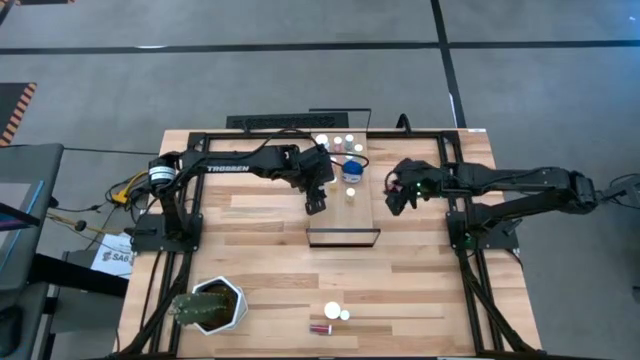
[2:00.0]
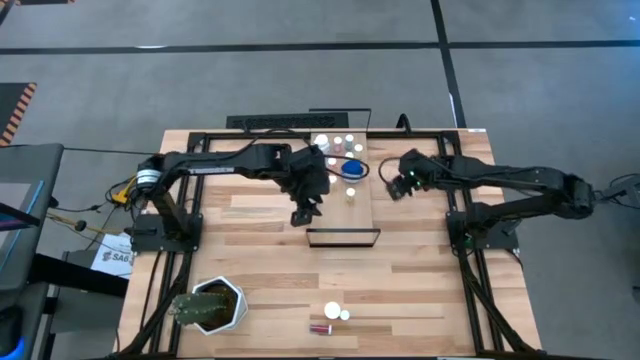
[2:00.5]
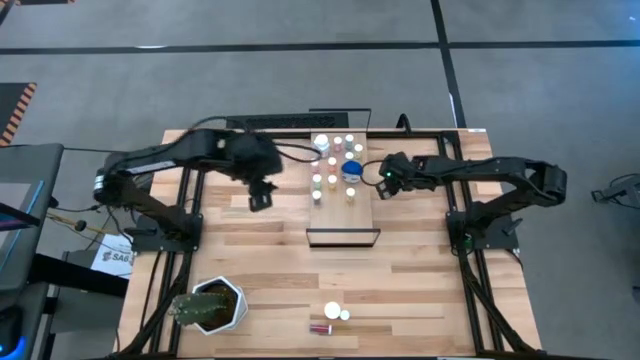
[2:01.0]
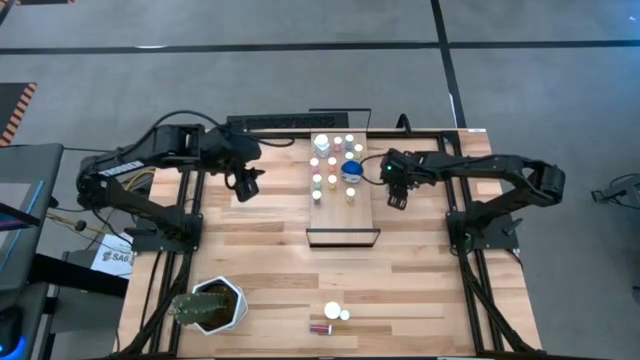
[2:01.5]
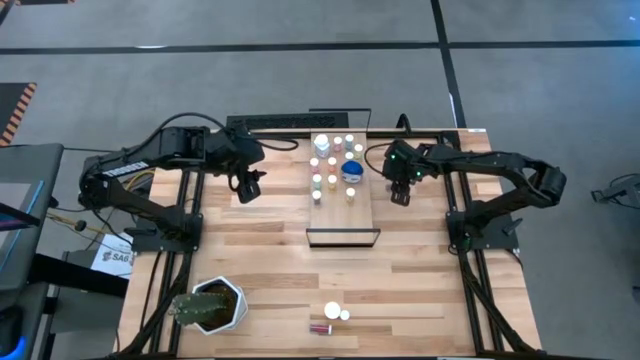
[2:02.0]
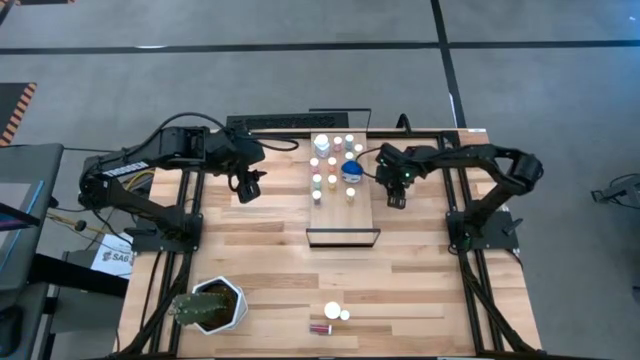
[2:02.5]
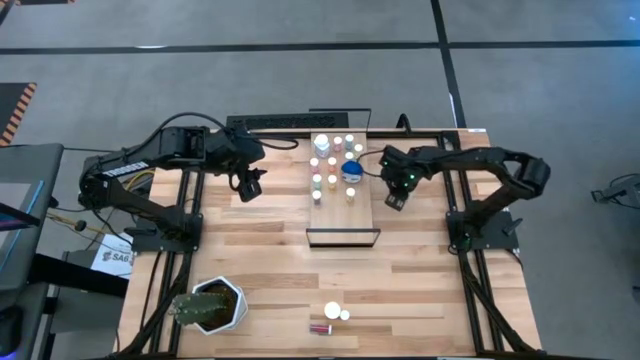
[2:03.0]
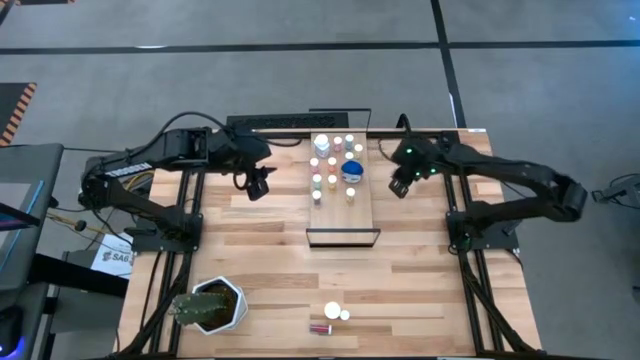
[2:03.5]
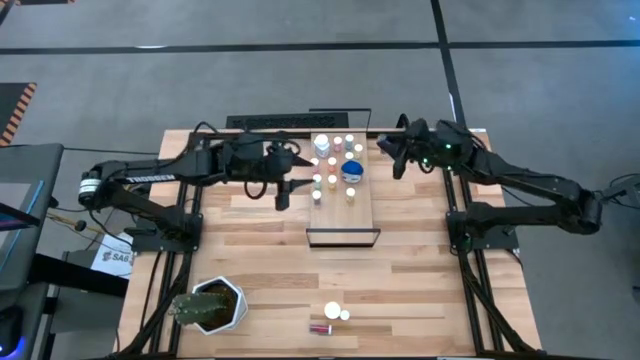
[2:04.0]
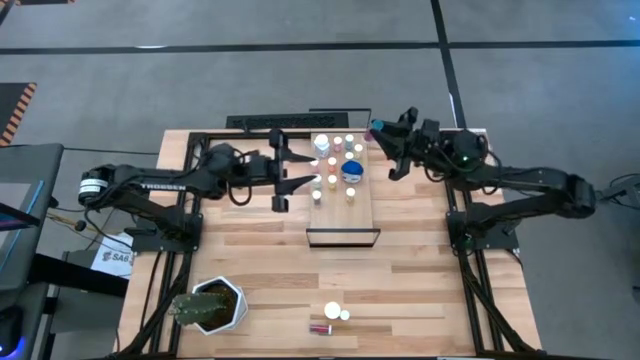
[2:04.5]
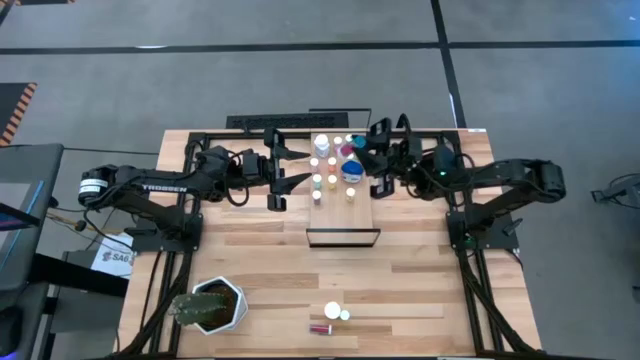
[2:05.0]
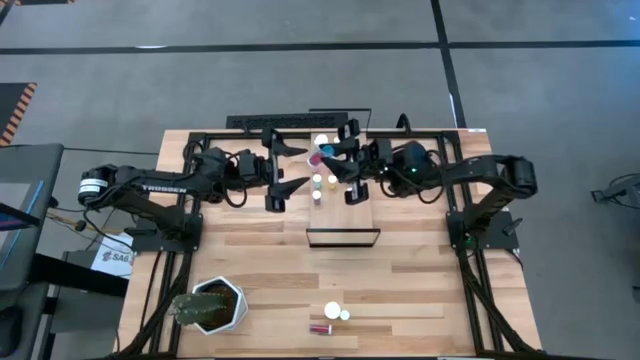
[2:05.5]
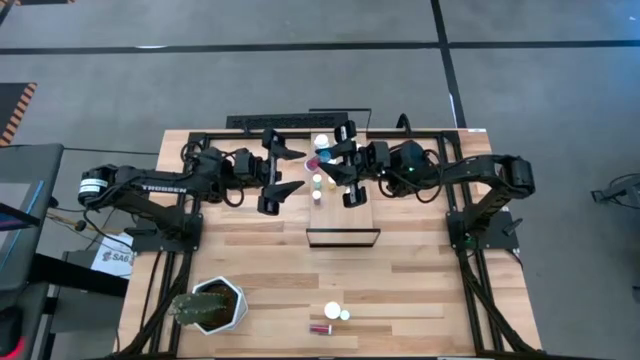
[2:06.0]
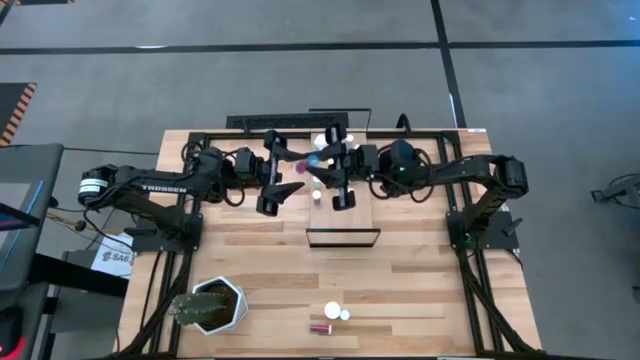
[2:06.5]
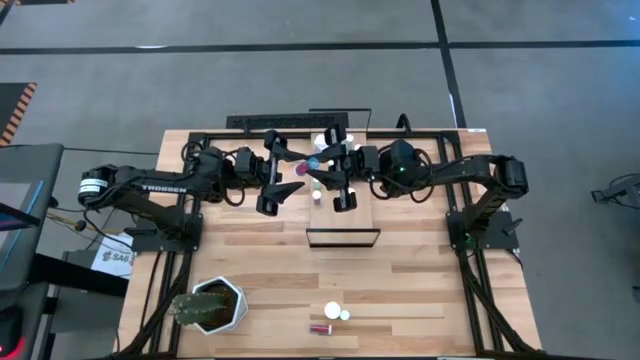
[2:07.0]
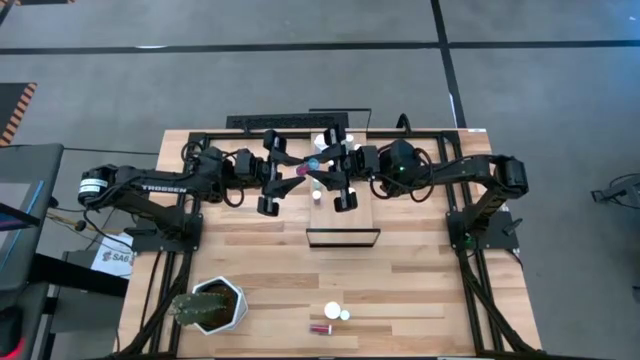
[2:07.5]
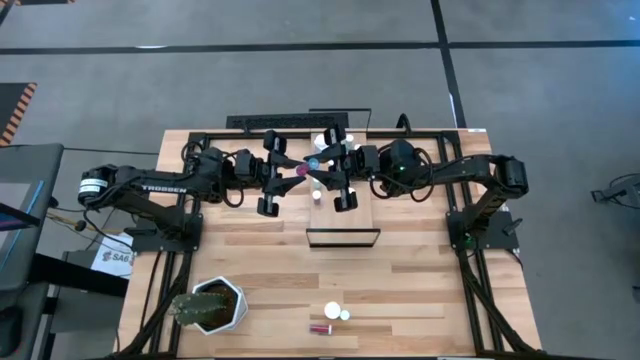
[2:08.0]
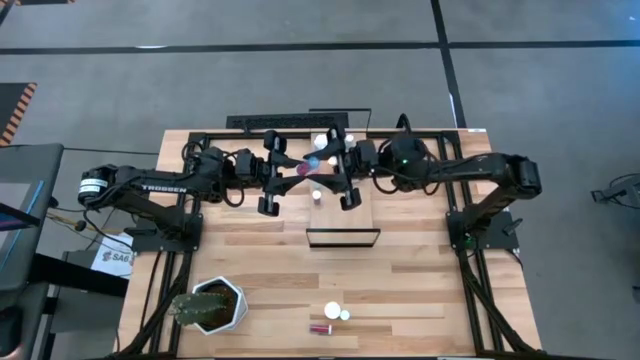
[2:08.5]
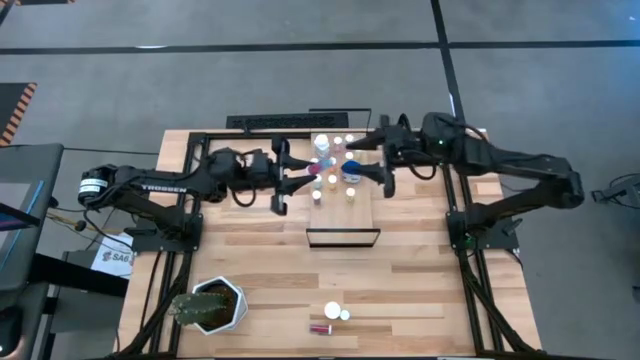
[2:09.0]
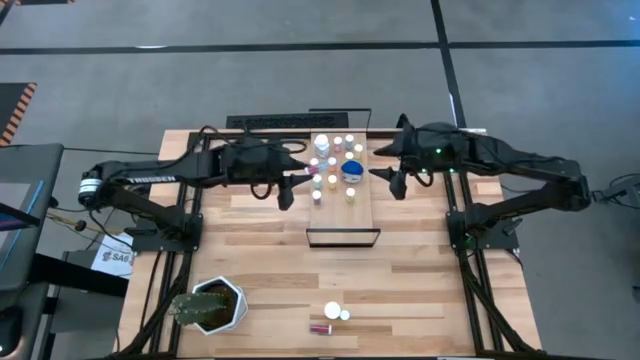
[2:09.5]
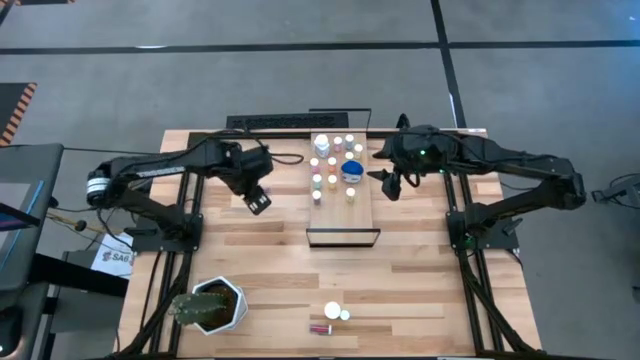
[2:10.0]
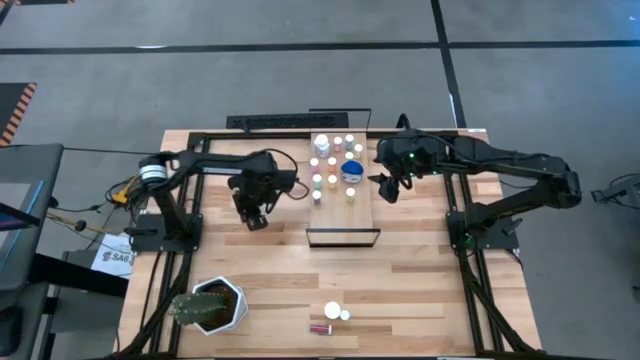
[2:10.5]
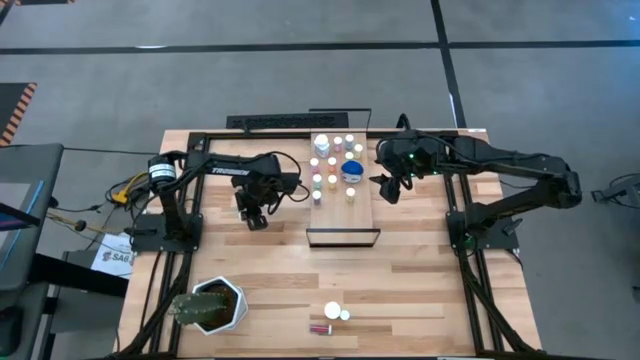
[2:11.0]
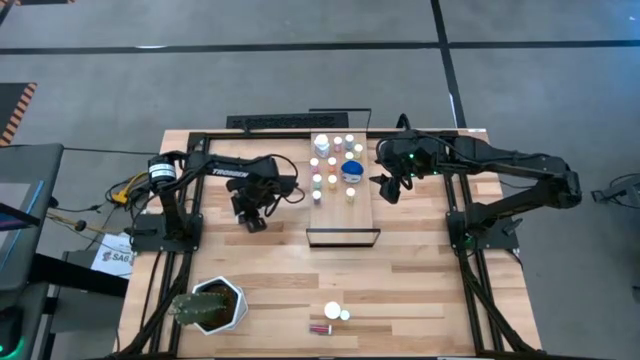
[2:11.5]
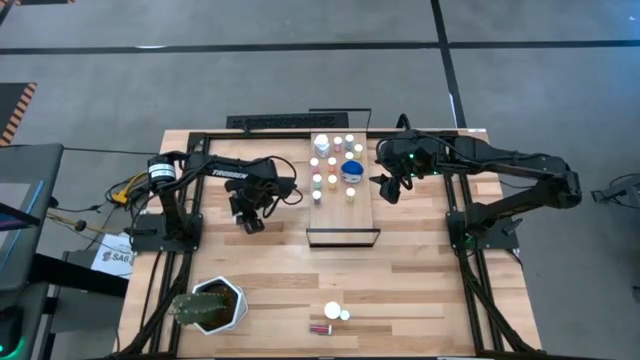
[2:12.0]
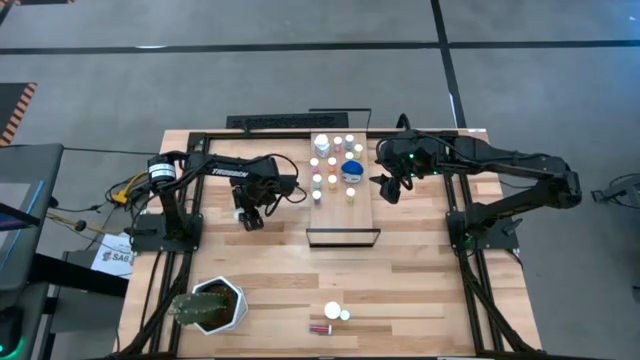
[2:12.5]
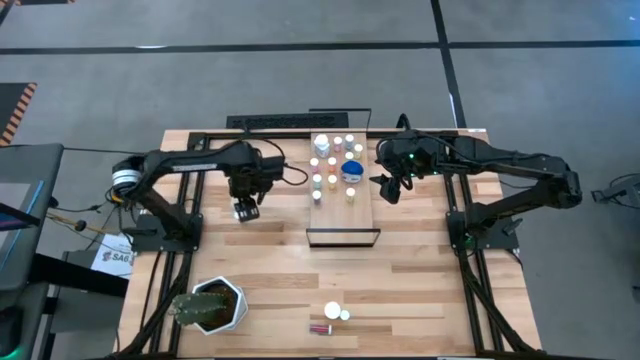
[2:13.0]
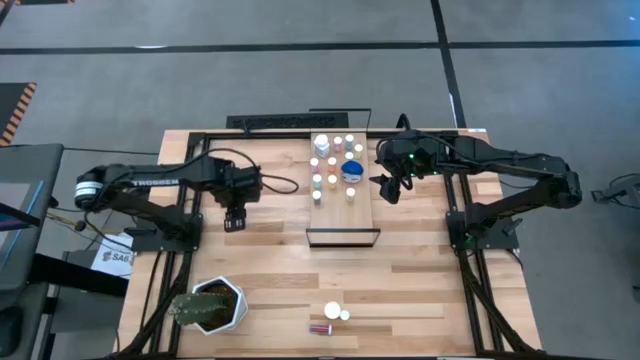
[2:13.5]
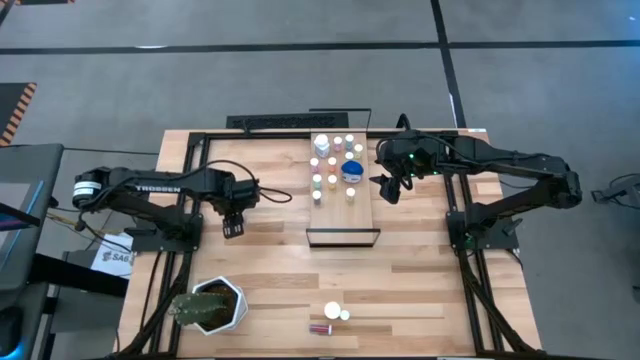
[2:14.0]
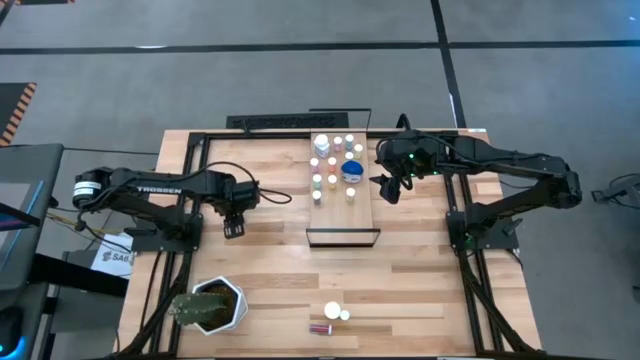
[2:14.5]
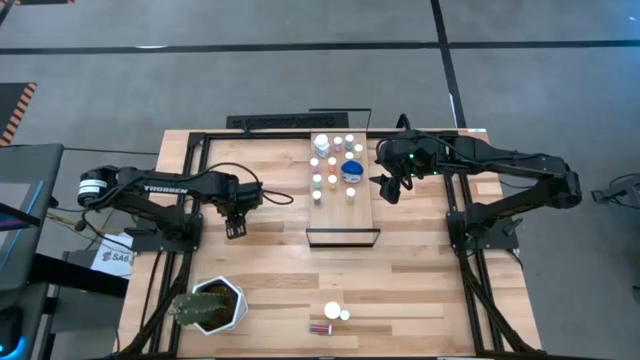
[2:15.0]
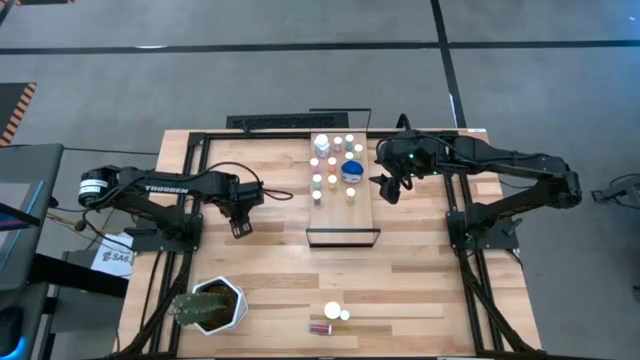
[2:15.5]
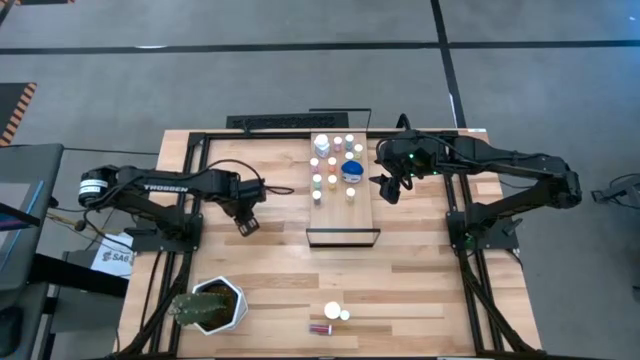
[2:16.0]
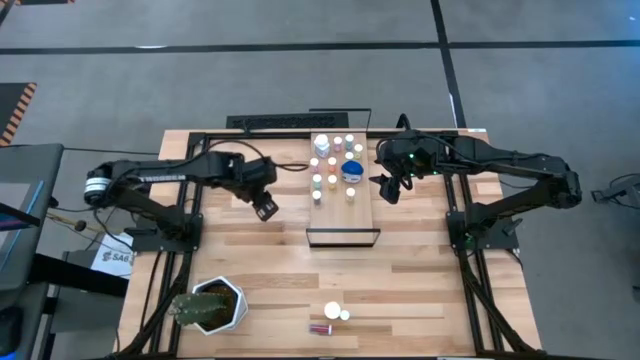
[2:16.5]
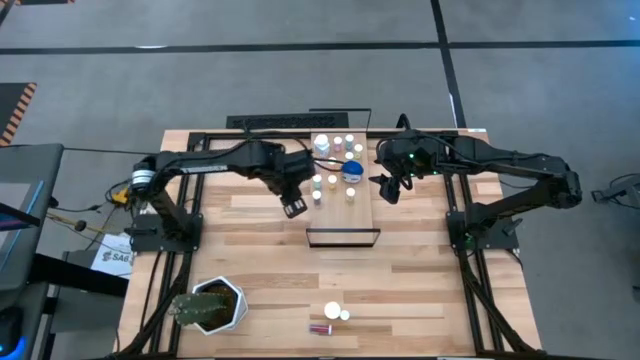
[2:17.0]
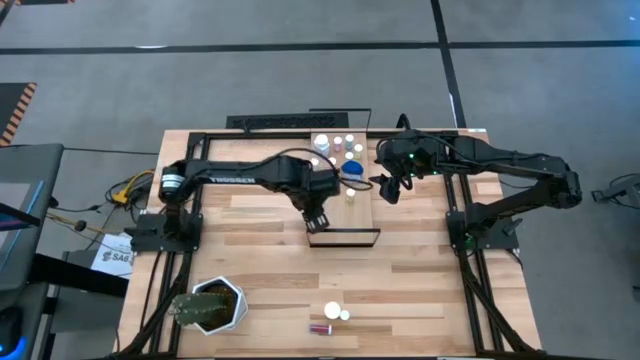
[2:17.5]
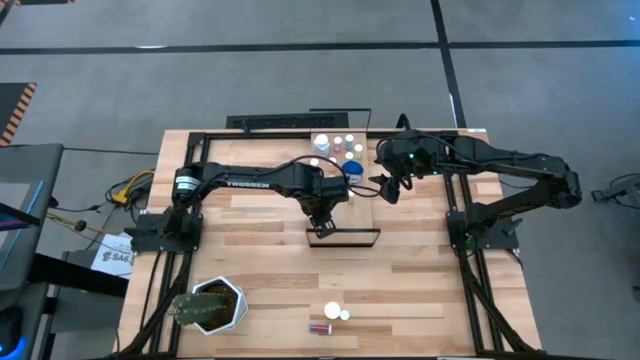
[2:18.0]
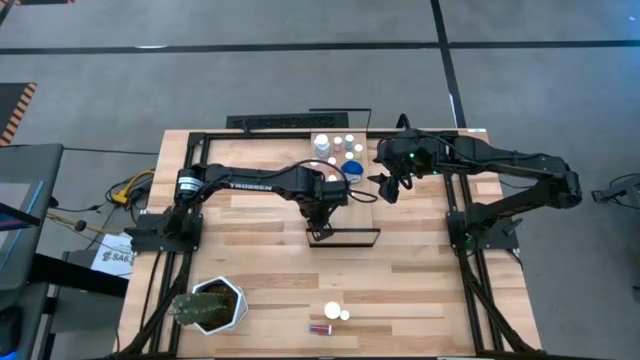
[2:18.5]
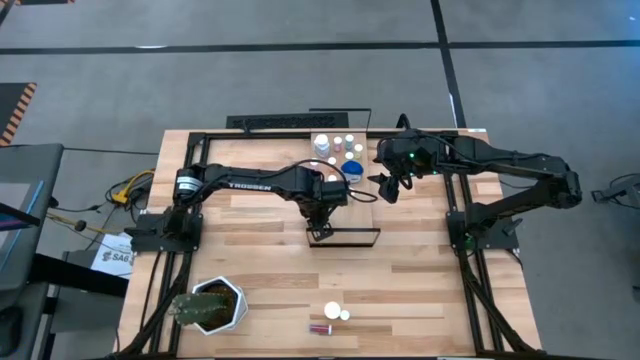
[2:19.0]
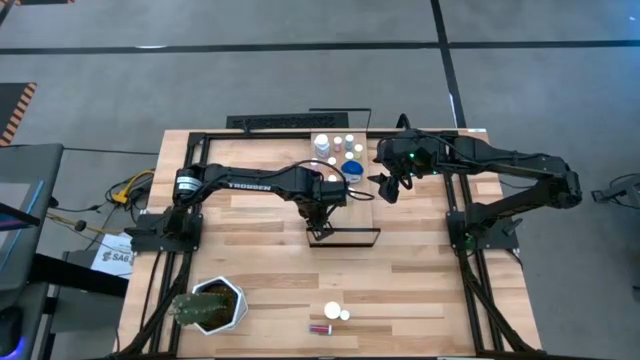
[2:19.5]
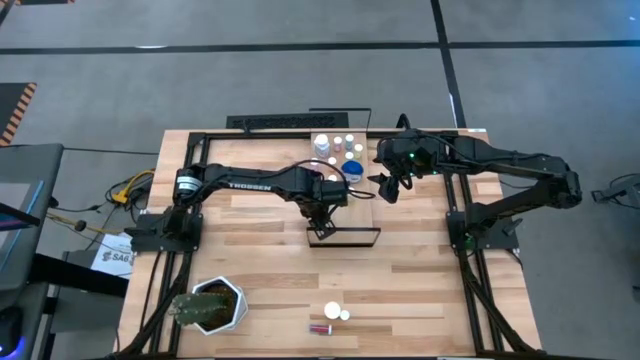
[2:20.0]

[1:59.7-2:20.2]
Task: Pick and place medicine bottles onto shelf by color
Put the light blue pill bottle on the shelf

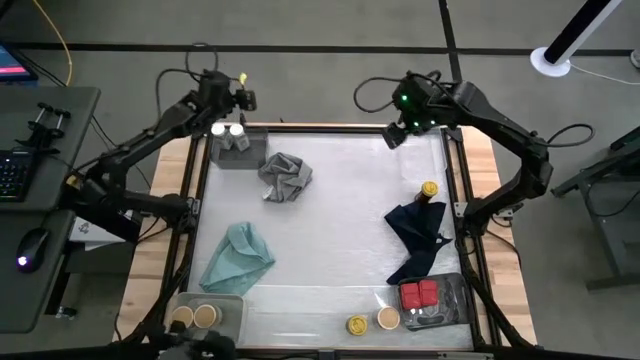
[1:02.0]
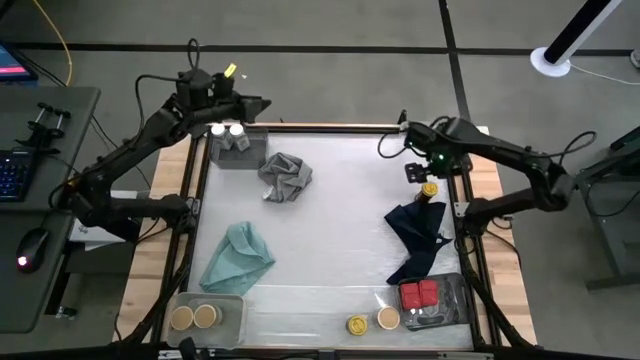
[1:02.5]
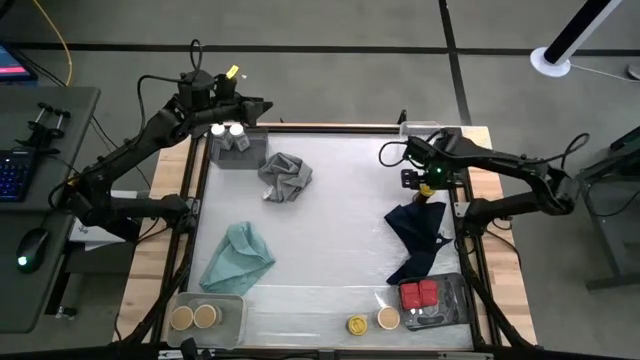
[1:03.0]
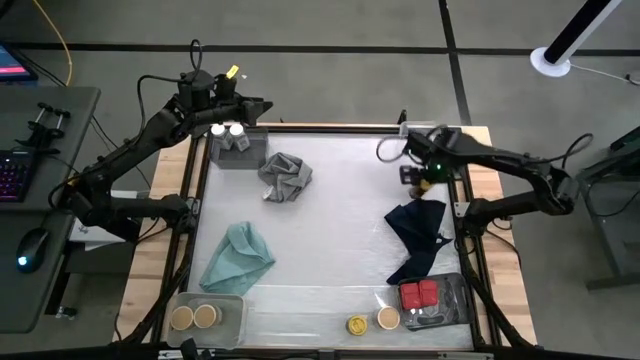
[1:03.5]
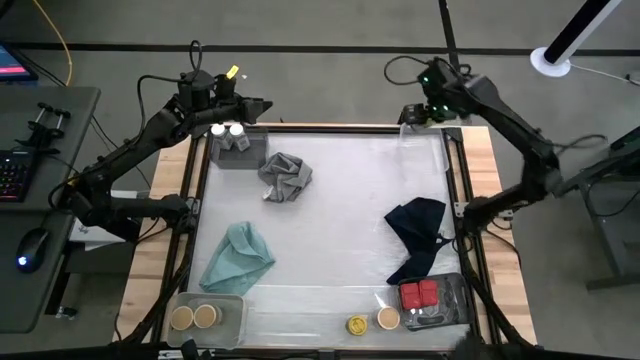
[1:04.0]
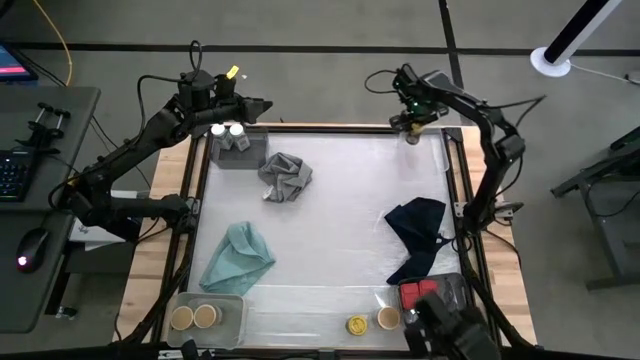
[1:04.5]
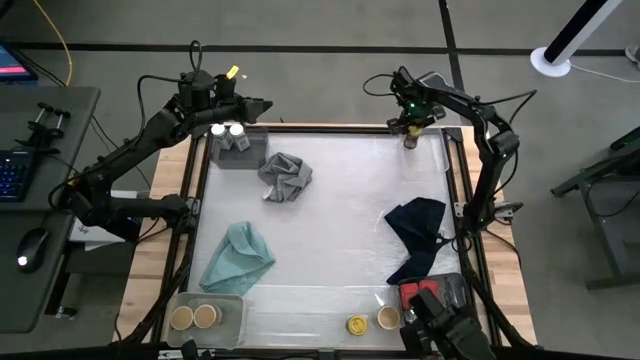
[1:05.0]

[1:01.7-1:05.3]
Task: Sort spices by type
Put the top yellow seasoning bottle into the transparent bin
